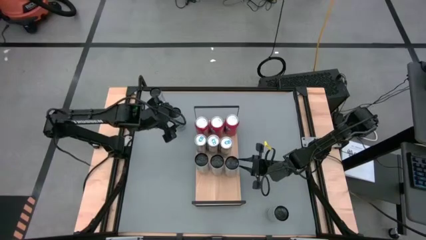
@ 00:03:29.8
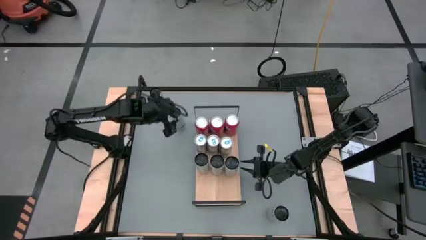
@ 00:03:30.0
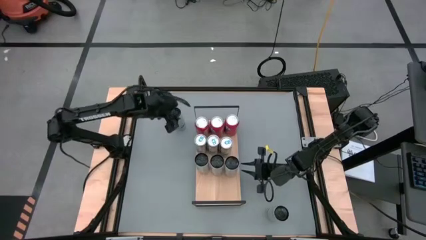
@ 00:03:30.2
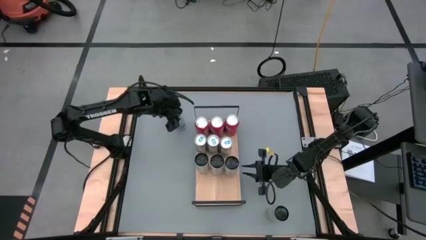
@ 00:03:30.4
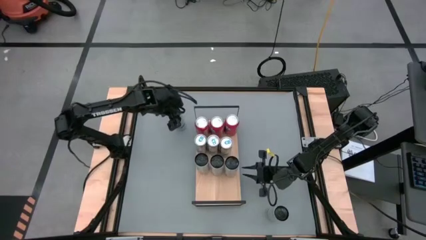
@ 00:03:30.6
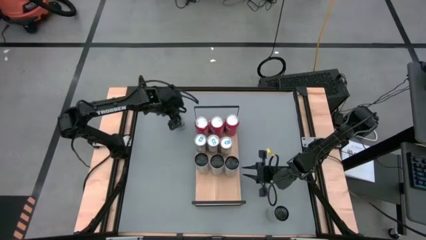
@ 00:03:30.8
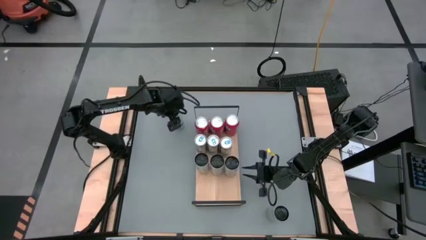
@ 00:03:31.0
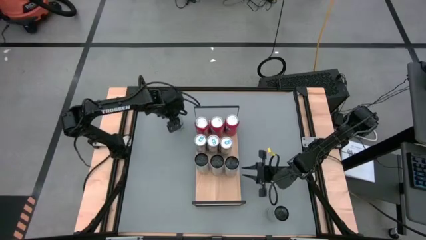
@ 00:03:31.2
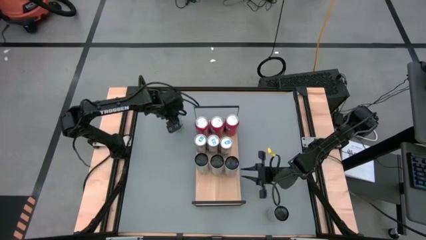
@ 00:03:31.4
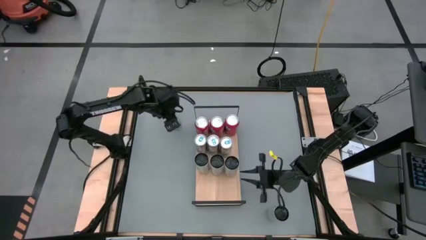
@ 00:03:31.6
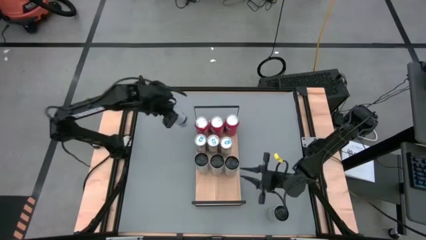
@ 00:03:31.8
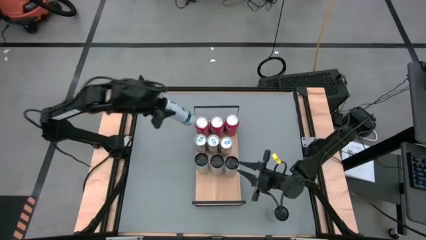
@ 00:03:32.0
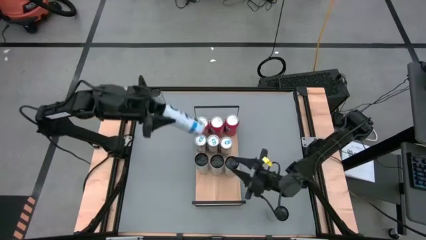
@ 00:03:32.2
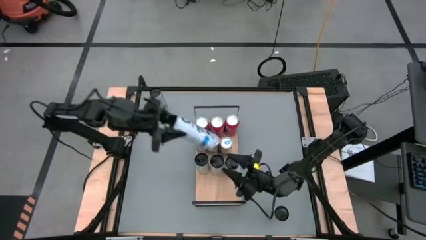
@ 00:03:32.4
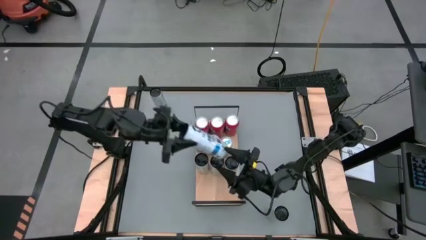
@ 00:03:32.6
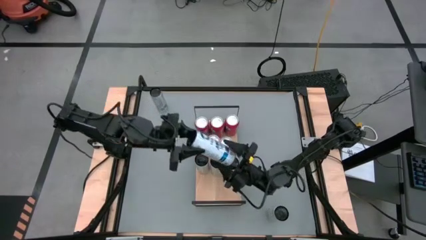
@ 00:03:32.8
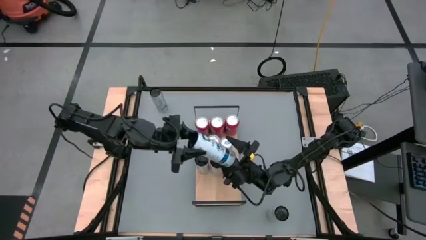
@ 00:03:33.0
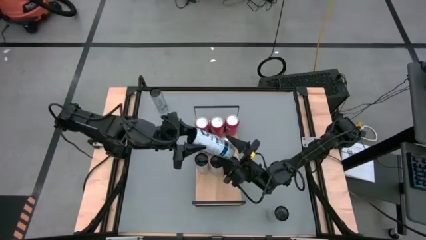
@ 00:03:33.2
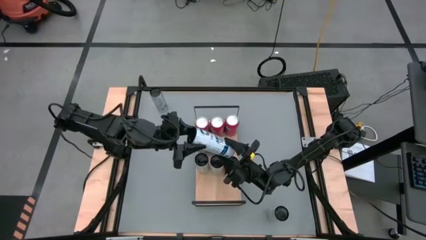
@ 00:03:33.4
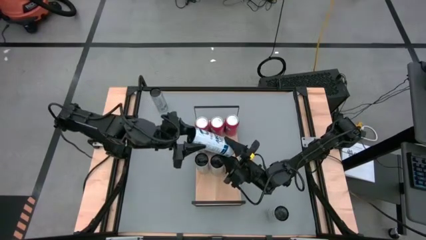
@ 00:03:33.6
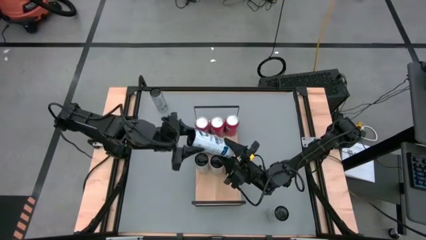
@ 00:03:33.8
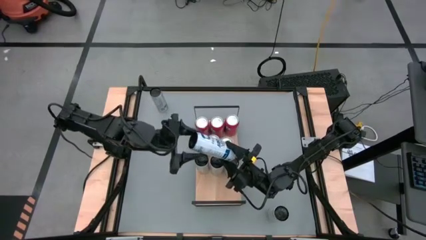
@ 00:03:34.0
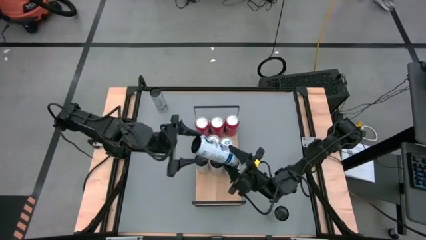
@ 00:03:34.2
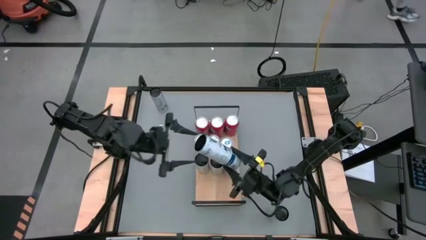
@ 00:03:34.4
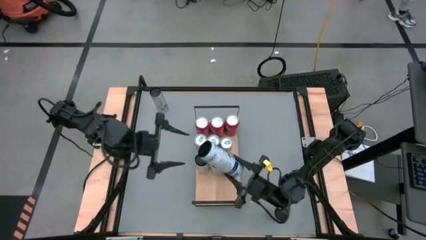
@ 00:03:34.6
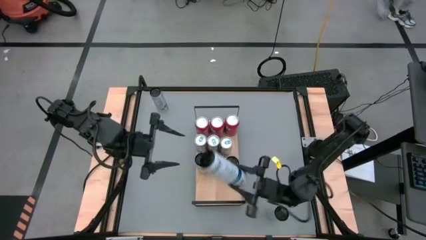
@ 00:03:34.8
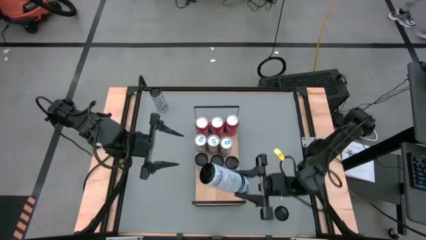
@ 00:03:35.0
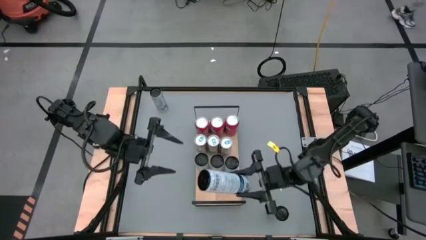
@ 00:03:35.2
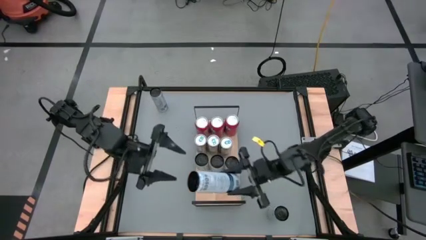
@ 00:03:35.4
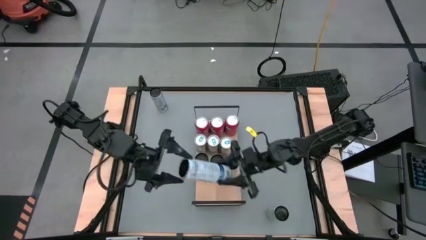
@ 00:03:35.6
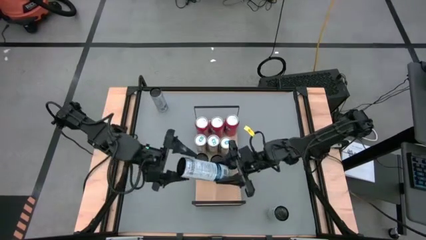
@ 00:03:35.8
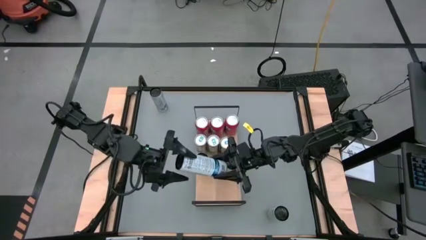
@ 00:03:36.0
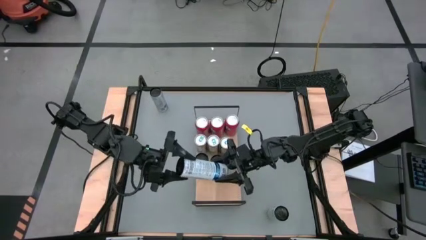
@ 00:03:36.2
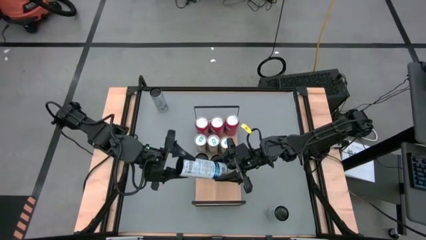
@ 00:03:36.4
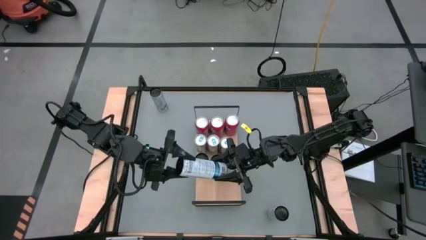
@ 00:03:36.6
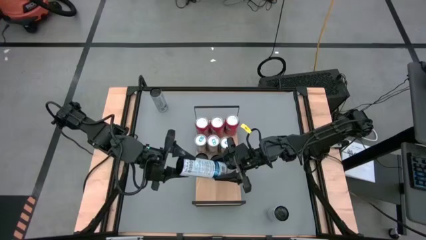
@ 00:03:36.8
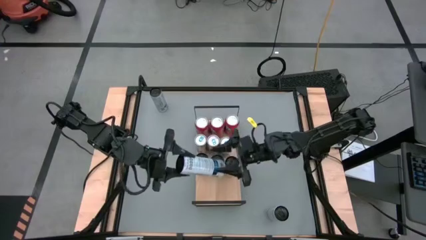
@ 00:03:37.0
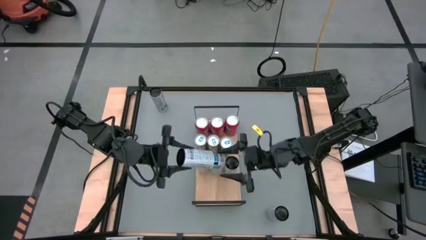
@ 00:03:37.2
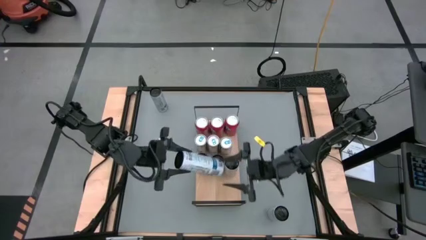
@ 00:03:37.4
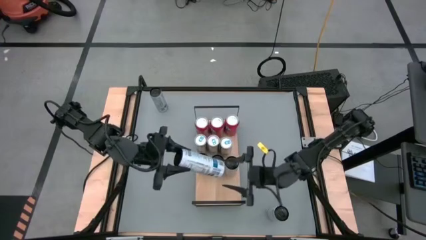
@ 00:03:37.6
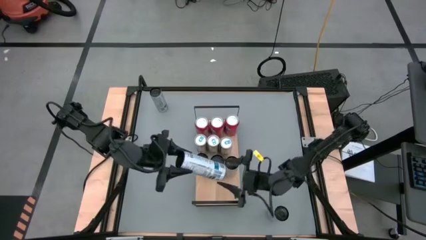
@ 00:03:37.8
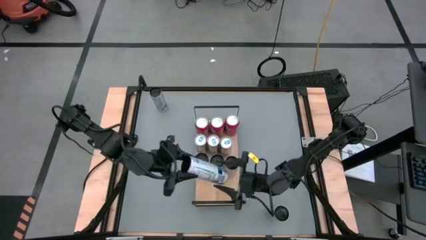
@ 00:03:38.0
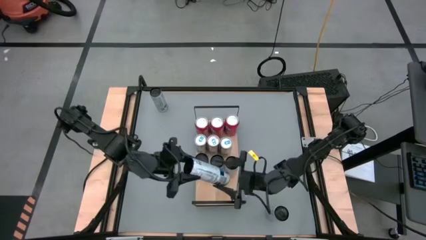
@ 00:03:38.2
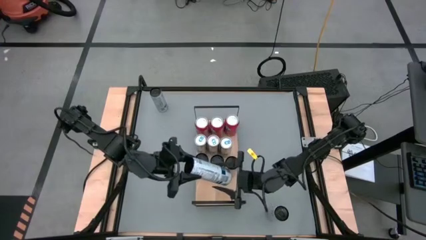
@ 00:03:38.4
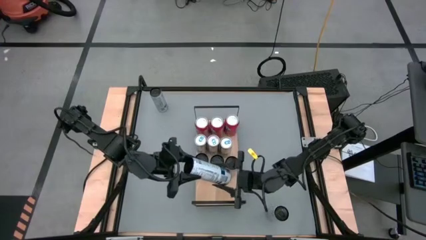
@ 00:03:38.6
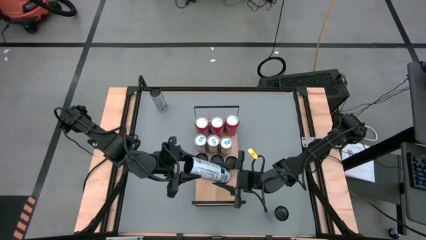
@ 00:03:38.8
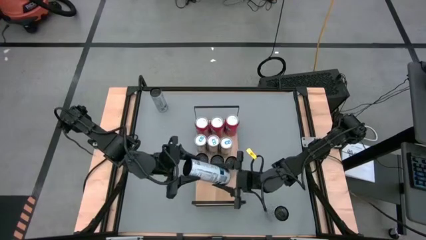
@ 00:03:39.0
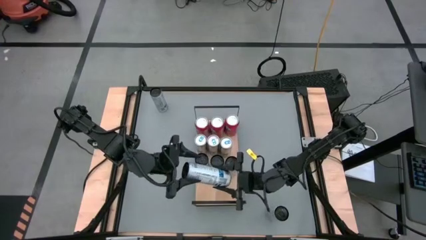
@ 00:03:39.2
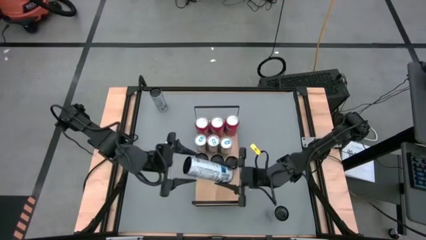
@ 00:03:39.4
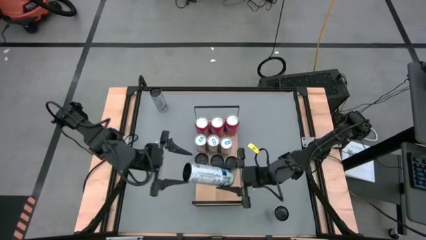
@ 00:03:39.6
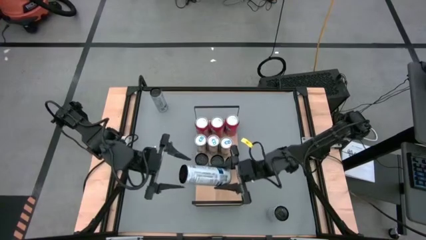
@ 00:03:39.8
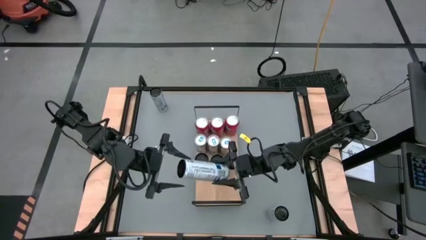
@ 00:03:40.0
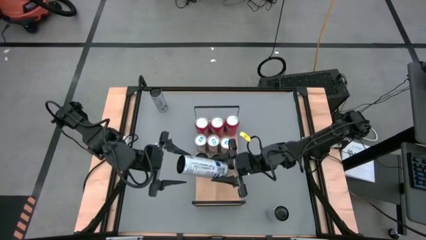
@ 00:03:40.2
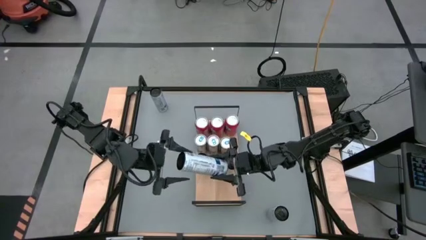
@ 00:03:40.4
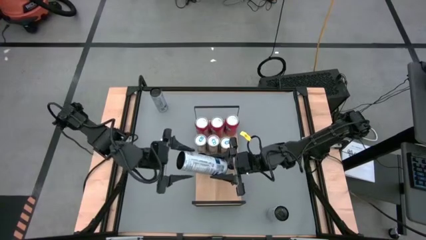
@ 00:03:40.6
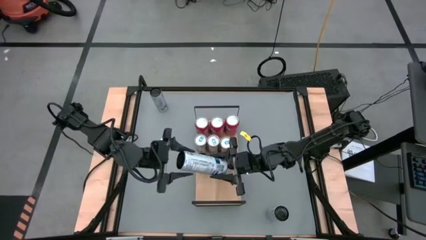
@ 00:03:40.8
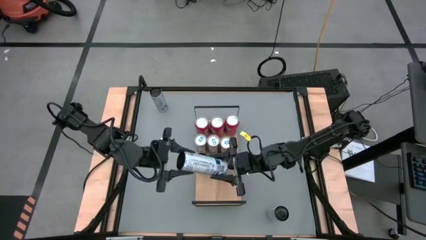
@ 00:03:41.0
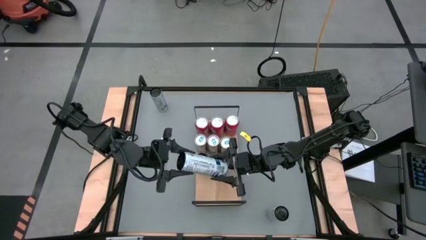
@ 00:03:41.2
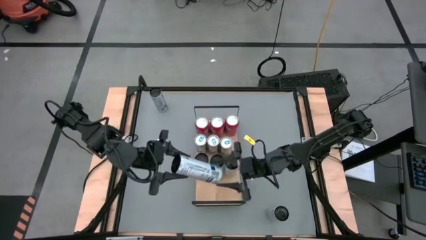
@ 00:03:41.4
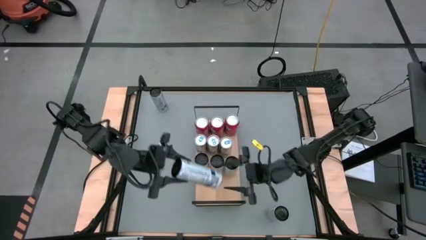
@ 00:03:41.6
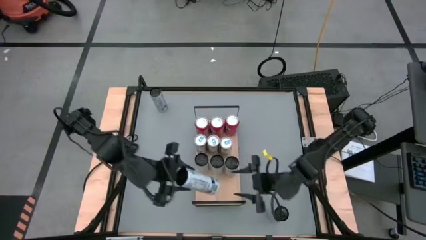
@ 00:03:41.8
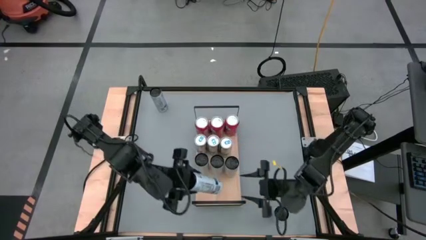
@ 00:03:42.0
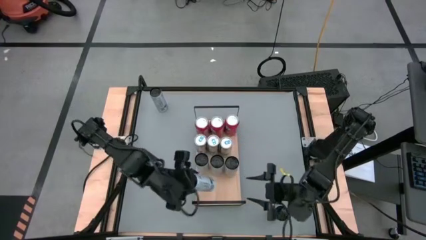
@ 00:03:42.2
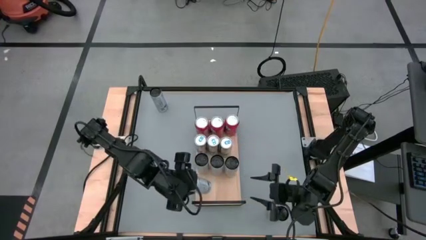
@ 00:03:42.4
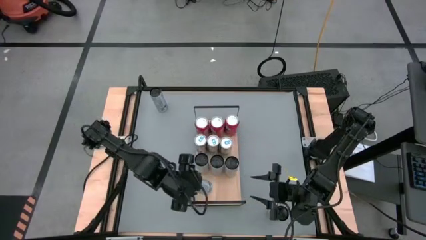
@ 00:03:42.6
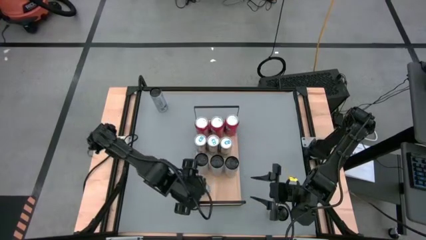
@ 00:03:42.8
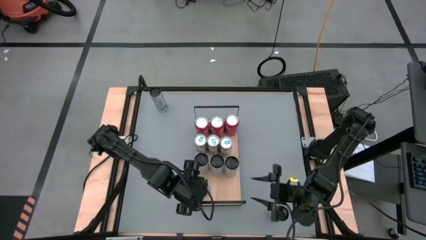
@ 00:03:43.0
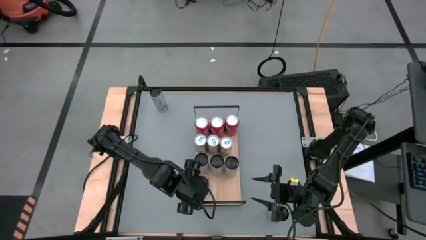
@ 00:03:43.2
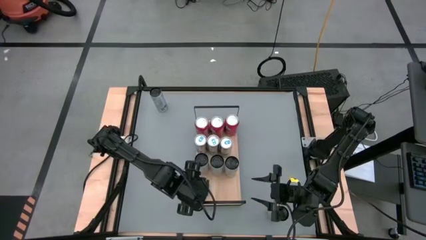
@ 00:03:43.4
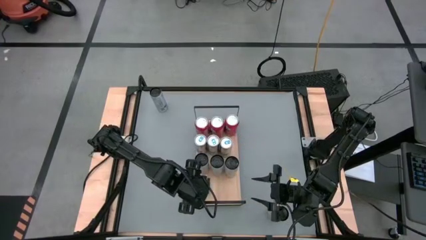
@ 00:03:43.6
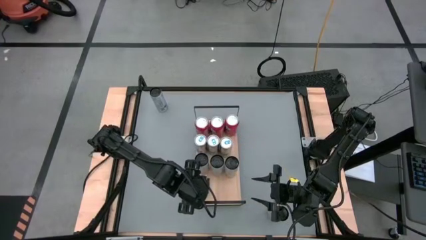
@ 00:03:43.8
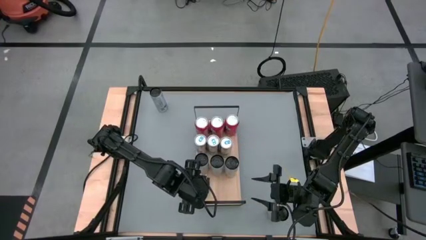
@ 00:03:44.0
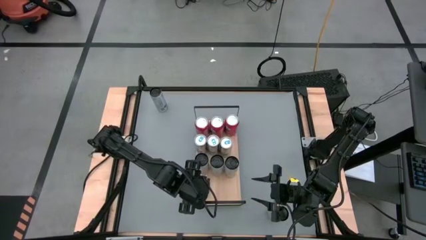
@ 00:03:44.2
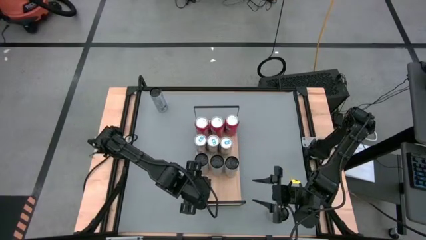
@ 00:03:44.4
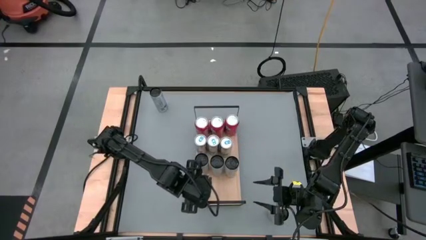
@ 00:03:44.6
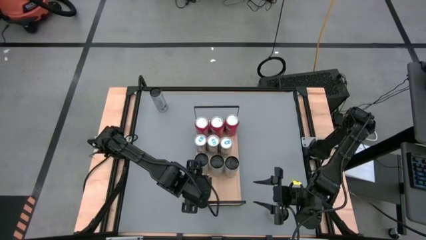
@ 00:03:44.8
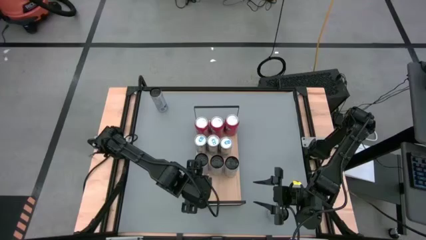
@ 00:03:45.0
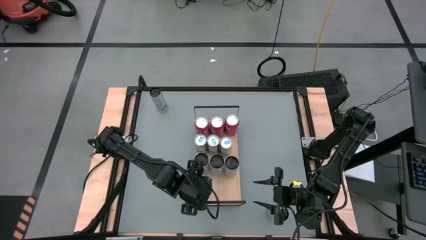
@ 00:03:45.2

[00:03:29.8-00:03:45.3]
Task: Place canned beverage on shelf
Put the middle white-blue soda can on the shelf
